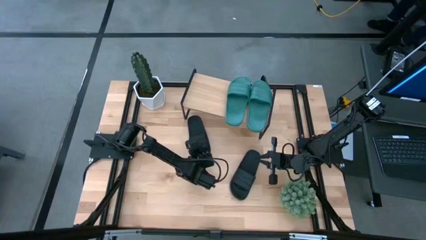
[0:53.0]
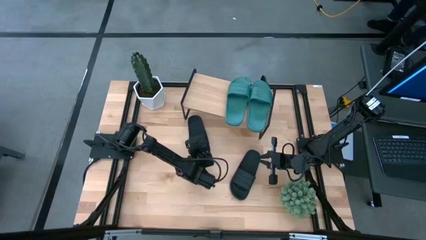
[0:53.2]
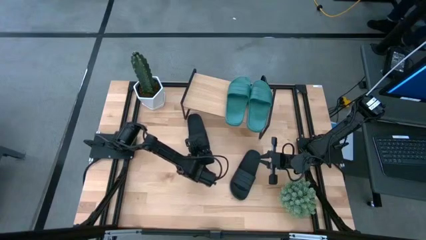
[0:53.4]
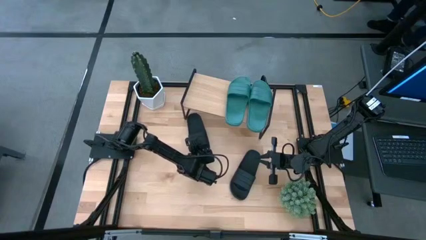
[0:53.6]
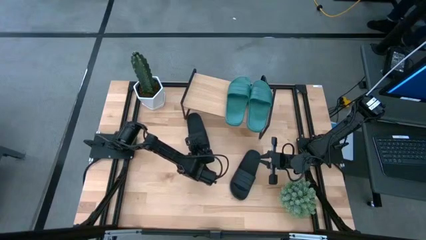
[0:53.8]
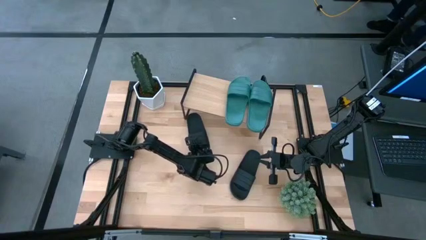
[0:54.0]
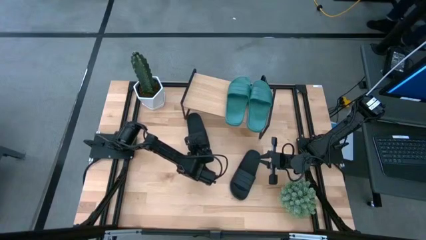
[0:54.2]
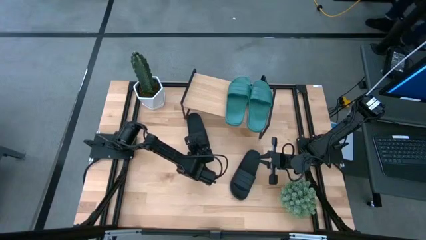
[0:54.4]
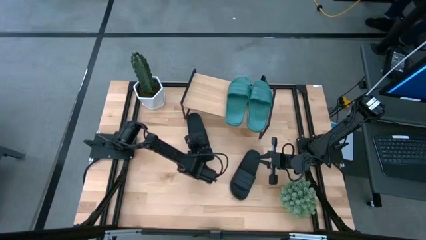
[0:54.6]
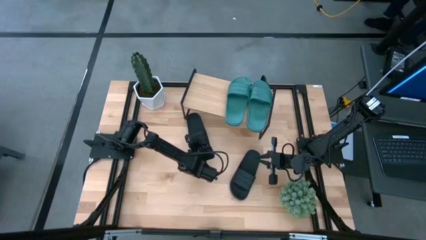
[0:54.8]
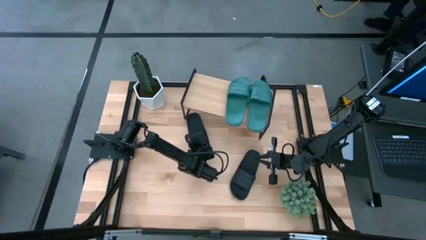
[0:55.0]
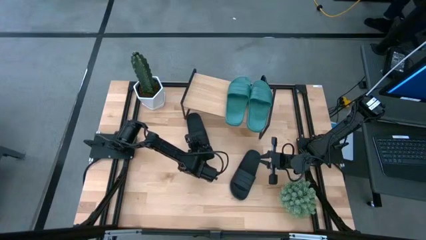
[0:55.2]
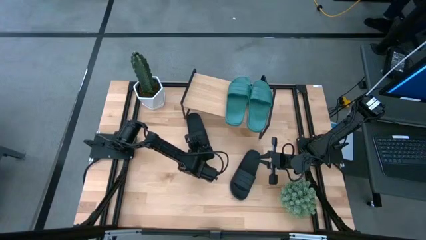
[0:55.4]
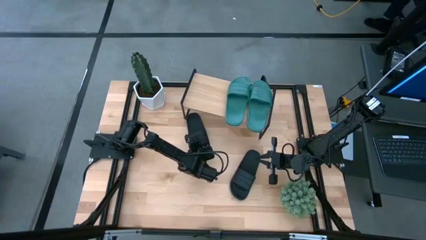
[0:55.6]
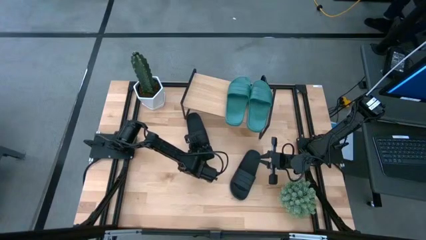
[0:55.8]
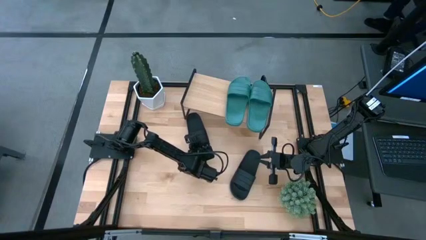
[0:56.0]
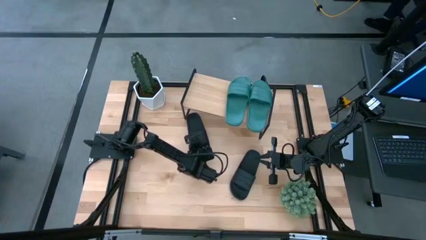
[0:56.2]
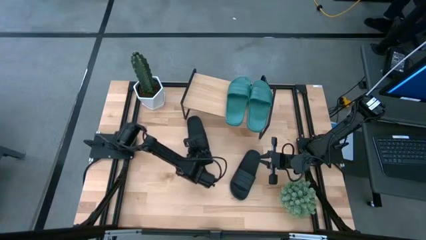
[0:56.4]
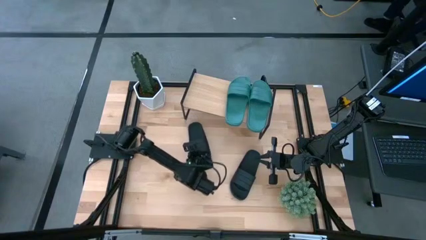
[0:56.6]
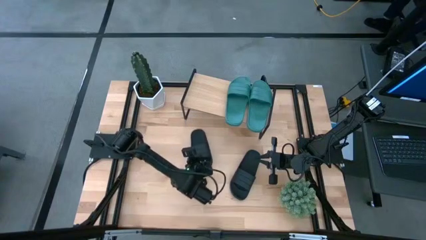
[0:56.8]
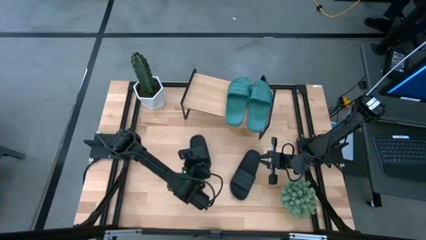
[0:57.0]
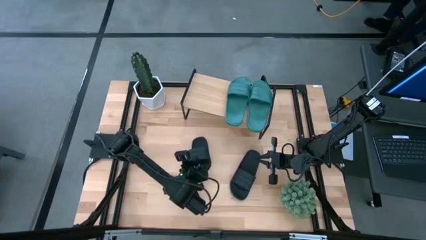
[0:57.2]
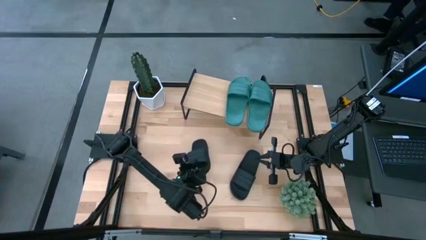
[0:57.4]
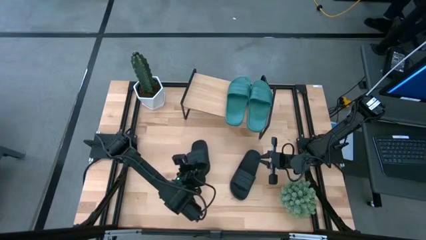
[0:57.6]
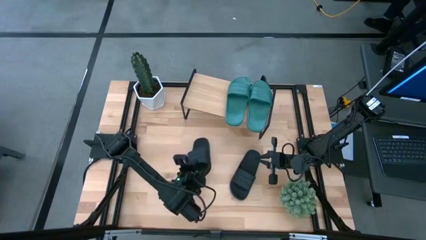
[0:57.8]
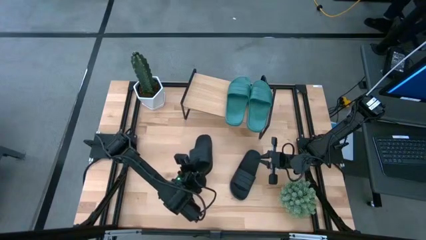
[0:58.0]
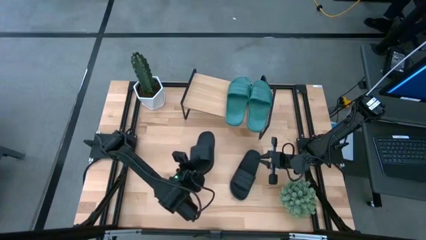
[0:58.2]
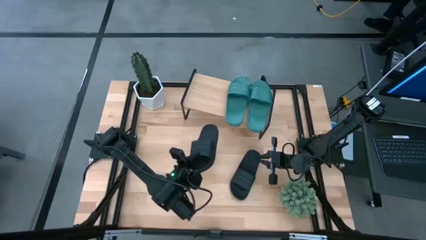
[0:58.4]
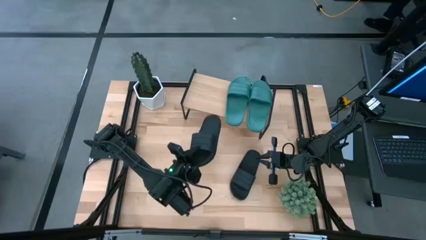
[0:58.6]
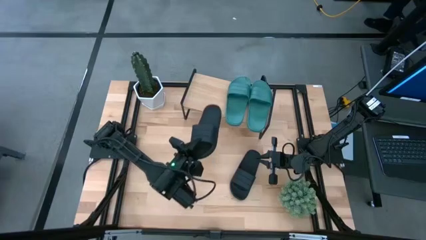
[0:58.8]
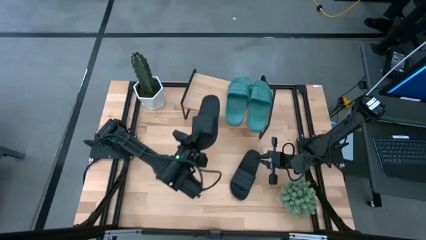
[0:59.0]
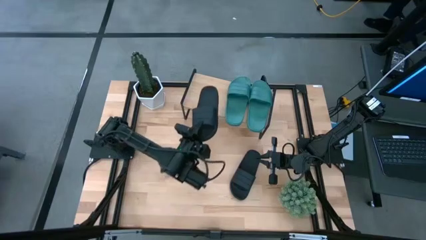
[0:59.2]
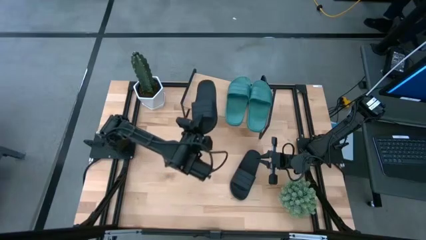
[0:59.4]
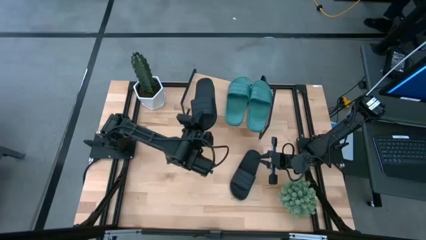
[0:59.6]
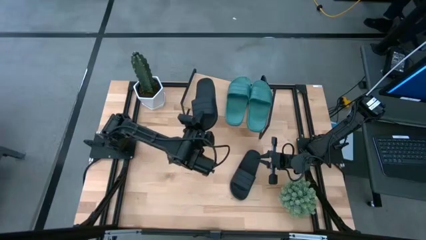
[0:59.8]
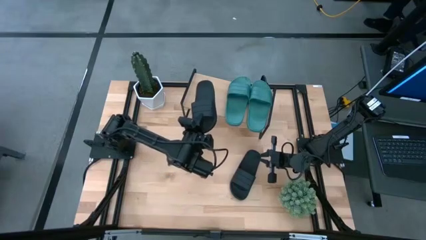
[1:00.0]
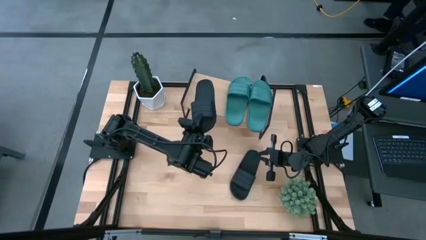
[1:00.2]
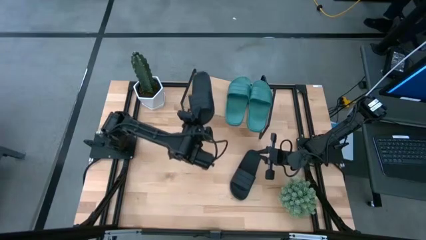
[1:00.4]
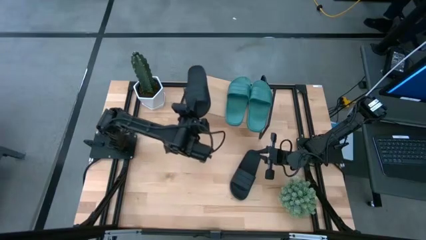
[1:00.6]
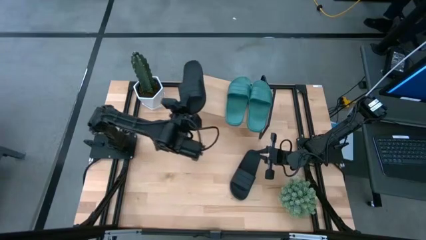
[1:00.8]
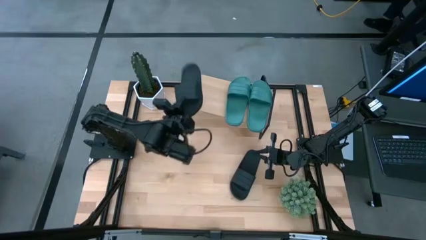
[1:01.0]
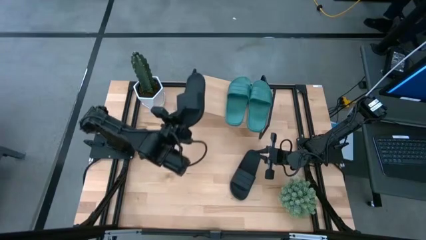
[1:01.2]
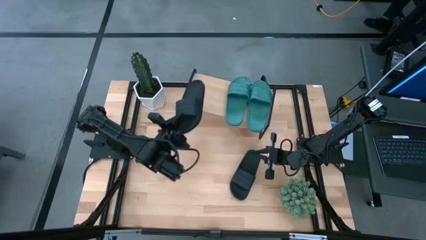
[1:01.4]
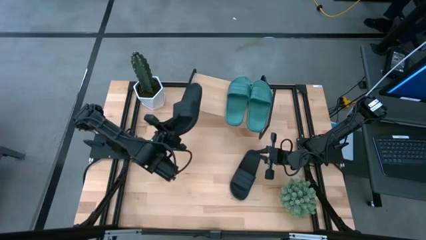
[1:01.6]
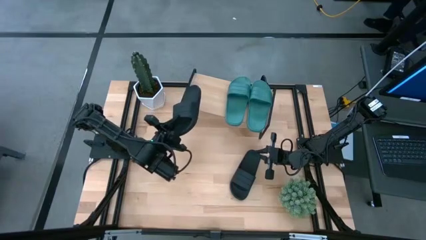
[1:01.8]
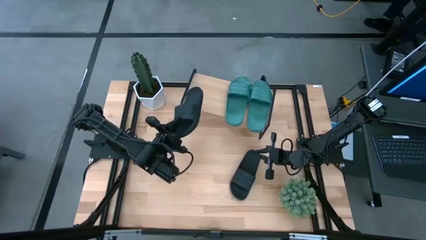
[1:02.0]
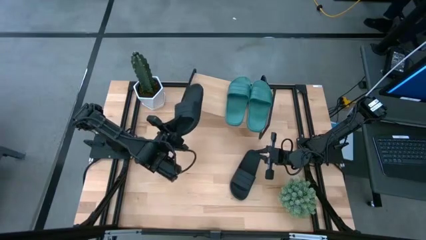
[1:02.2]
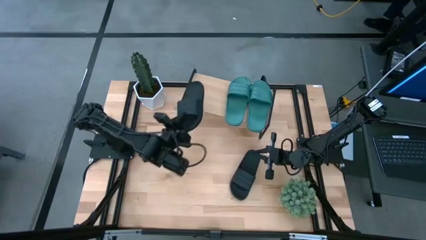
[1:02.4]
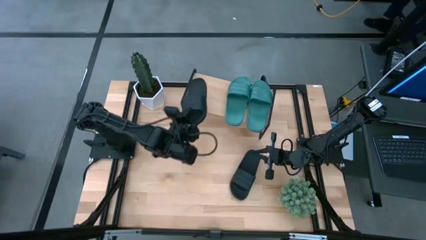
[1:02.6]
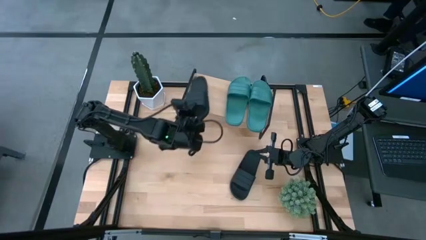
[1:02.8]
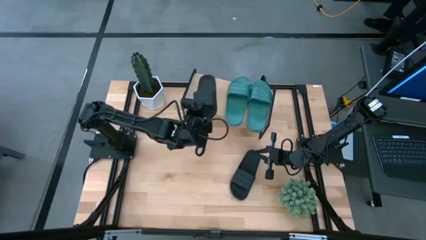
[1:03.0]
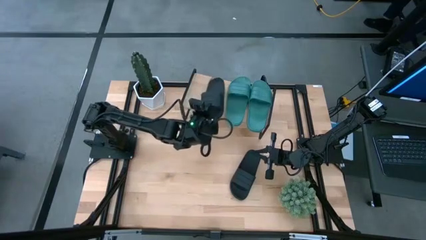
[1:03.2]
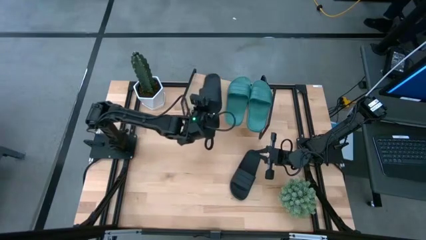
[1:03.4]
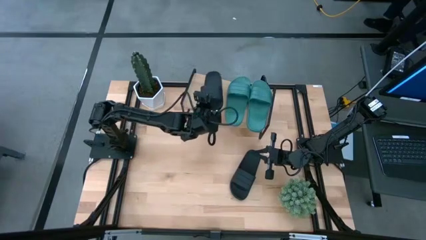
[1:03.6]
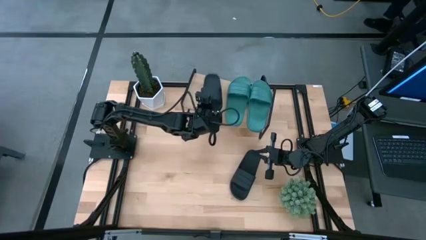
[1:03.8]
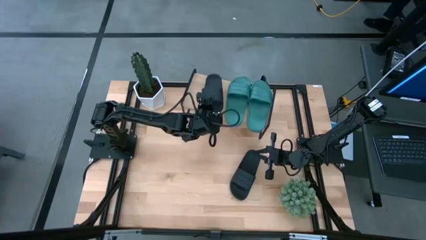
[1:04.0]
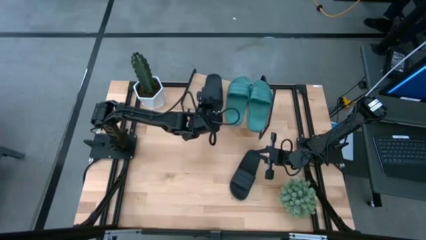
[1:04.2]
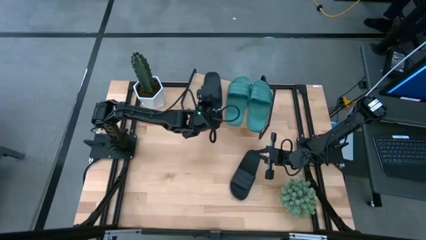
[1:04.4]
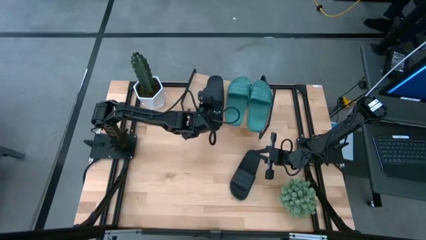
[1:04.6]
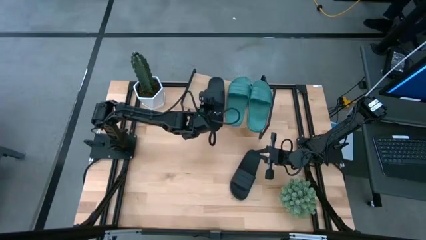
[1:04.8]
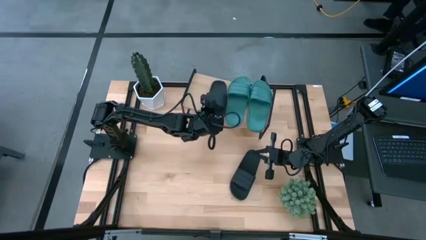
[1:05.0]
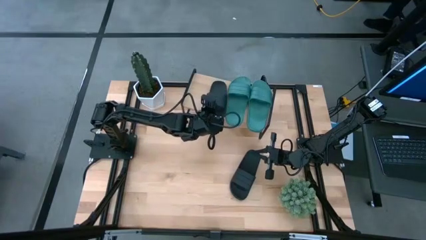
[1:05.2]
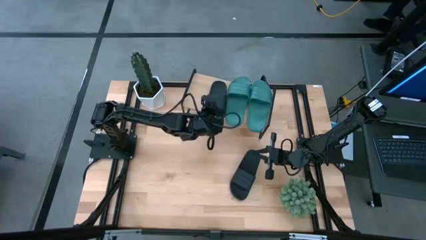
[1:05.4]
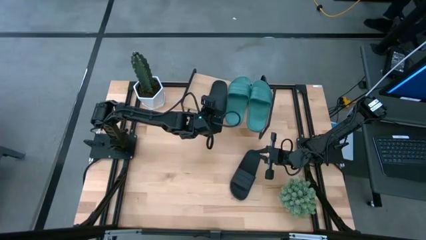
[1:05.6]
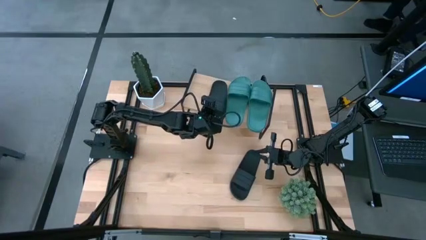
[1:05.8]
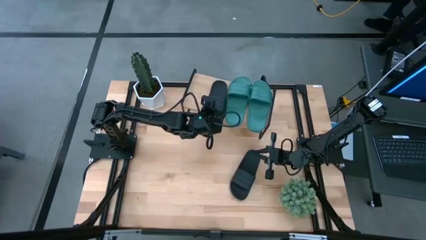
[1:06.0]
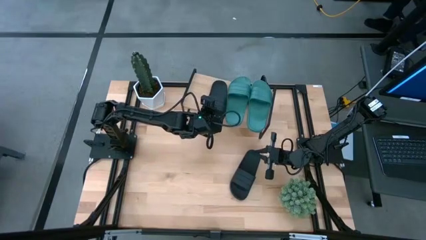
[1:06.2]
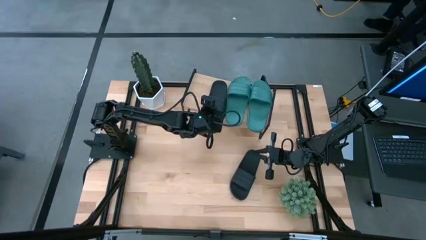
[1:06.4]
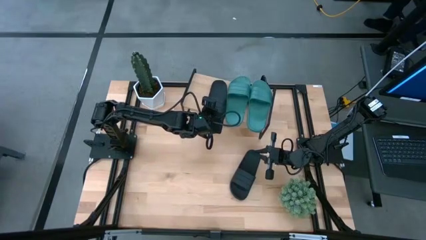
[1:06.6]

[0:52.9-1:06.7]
Task: Pick and place slides into the shelf
Put the left black slide on the shelf

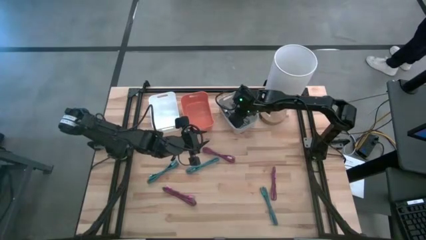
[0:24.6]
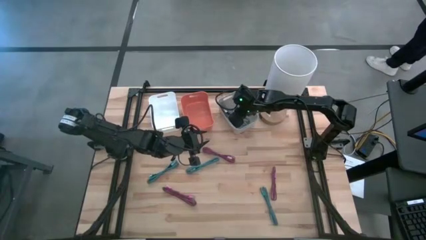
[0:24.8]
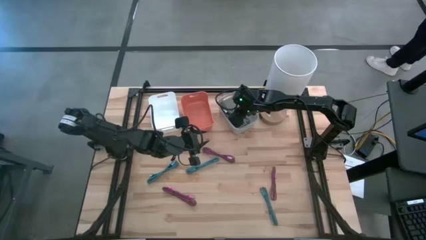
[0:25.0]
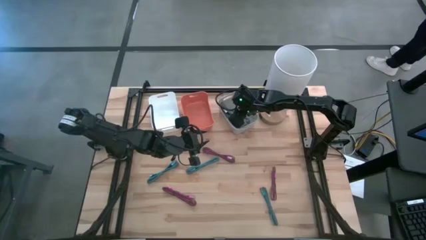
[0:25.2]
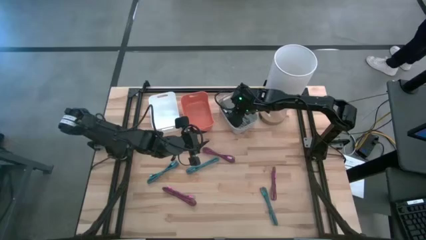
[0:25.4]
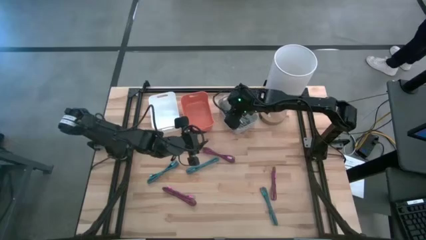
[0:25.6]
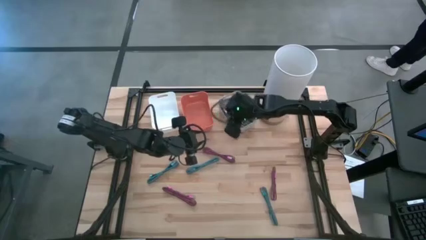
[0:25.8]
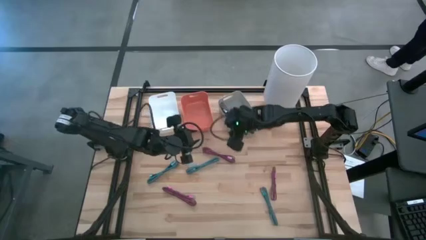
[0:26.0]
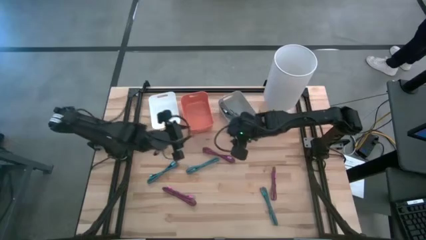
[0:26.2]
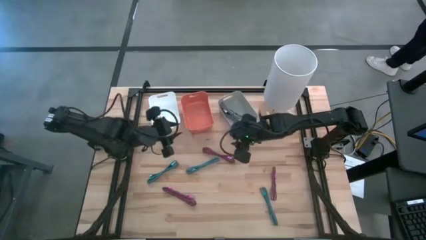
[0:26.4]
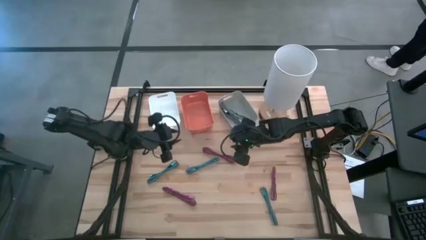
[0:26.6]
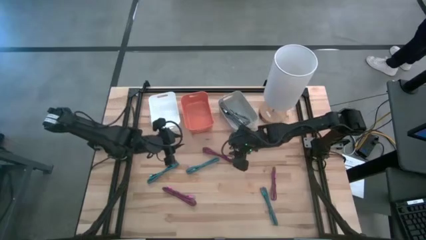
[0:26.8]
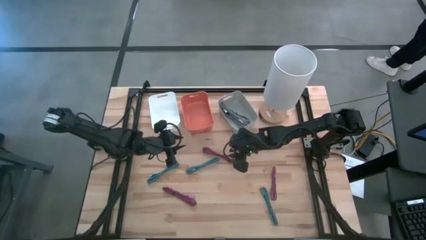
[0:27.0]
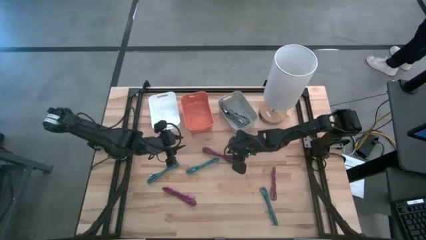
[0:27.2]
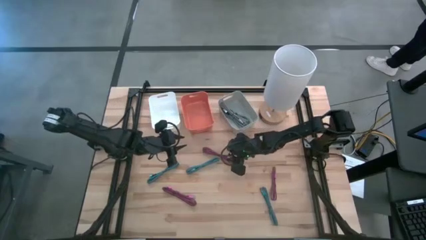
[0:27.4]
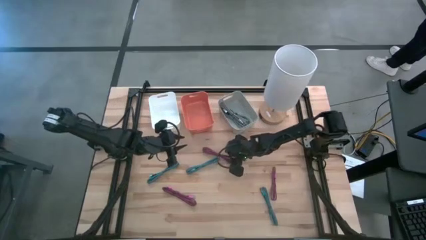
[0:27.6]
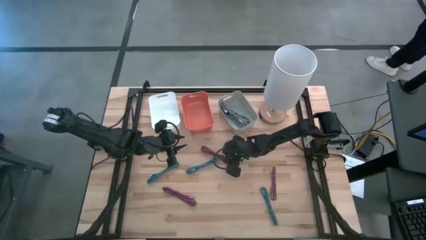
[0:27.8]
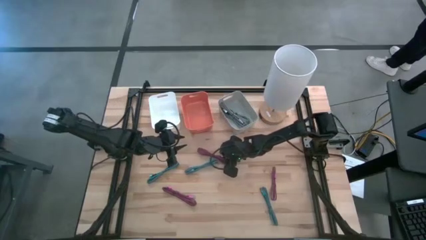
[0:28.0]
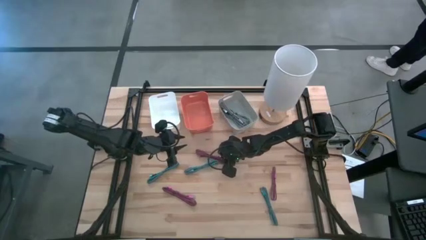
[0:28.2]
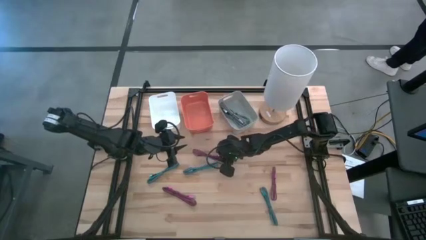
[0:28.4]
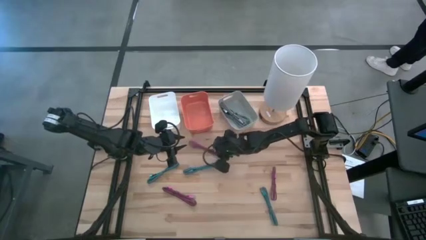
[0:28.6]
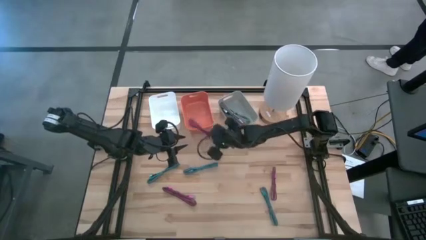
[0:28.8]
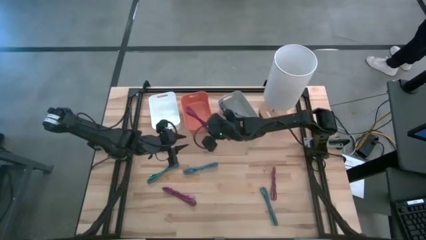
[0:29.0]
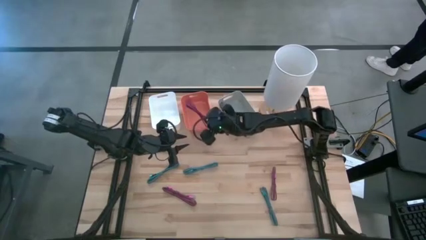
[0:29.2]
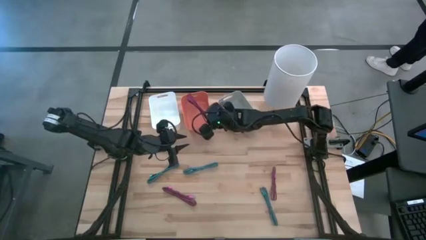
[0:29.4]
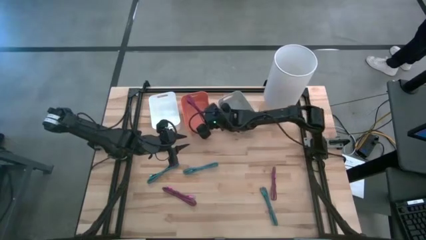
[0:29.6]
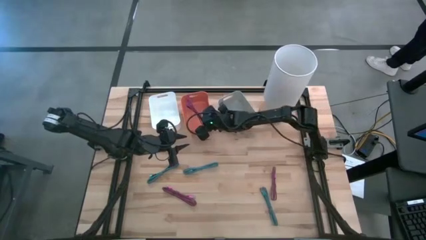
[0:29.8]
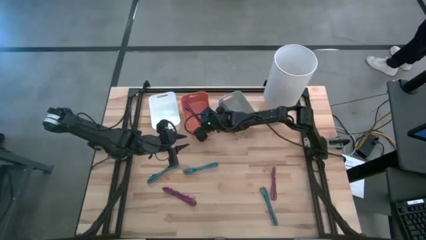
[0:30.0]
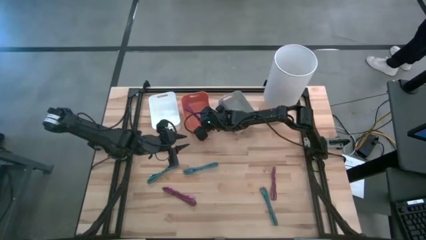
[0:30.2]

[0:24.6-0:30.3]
Task: Pick & Place USB Port
Put the top black and pink USB cable into the orange bin
